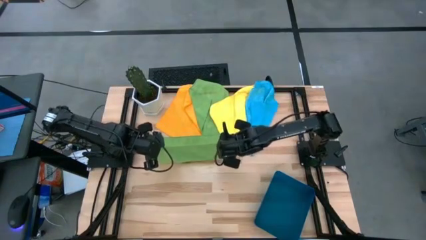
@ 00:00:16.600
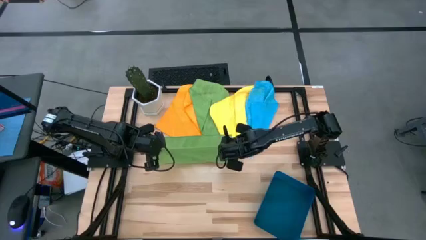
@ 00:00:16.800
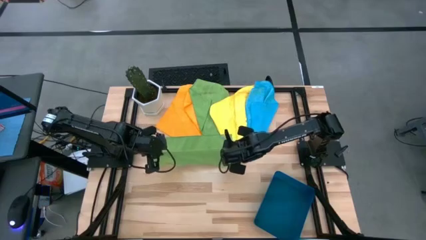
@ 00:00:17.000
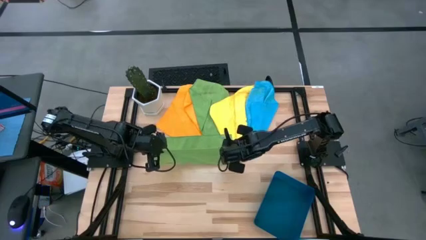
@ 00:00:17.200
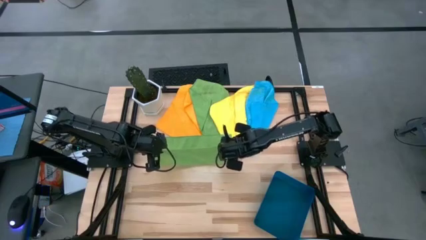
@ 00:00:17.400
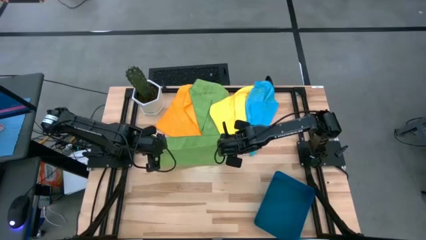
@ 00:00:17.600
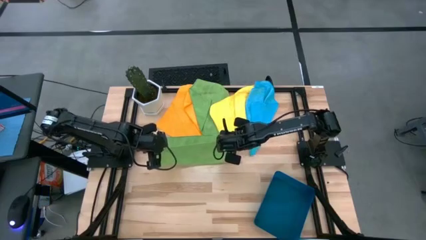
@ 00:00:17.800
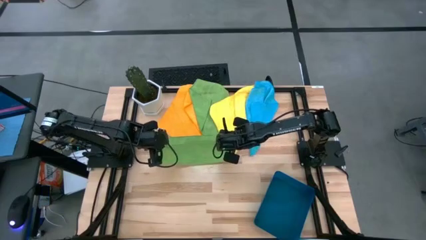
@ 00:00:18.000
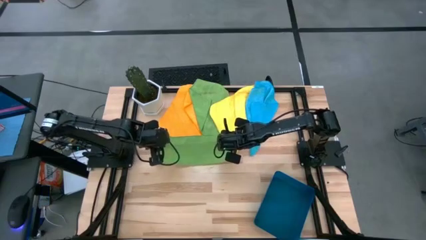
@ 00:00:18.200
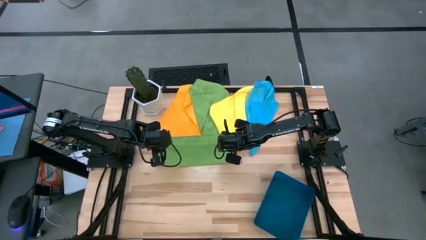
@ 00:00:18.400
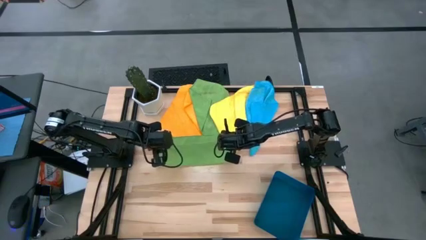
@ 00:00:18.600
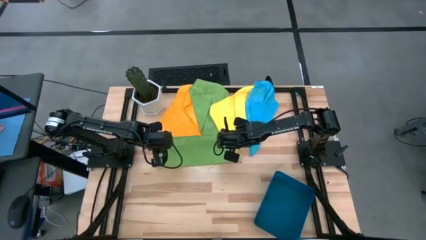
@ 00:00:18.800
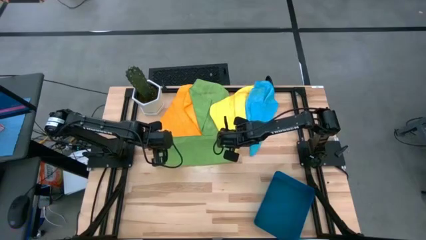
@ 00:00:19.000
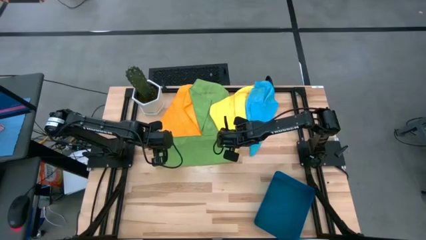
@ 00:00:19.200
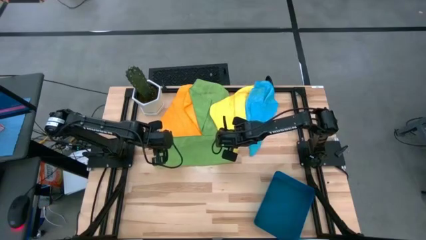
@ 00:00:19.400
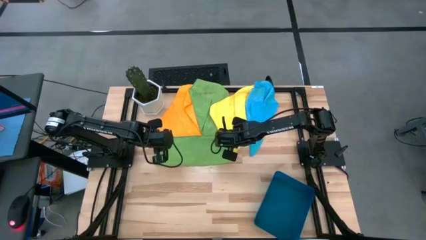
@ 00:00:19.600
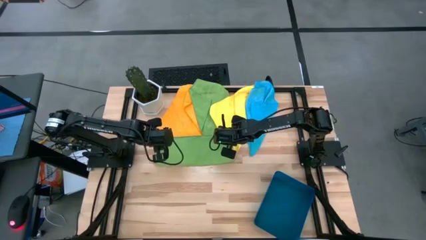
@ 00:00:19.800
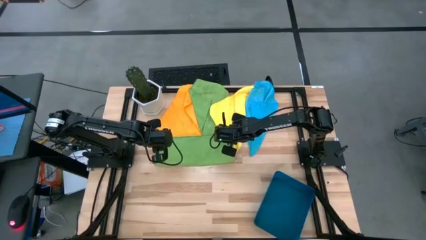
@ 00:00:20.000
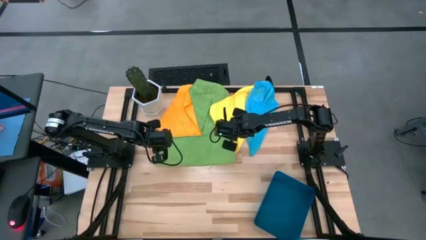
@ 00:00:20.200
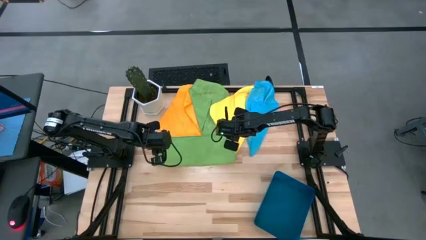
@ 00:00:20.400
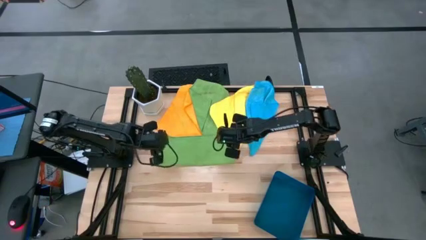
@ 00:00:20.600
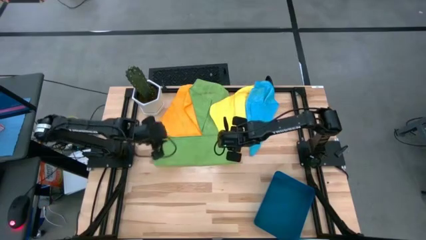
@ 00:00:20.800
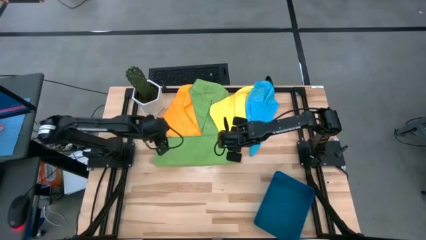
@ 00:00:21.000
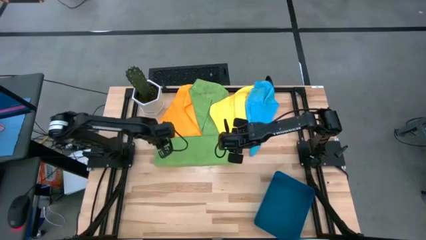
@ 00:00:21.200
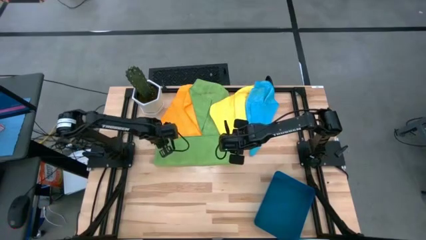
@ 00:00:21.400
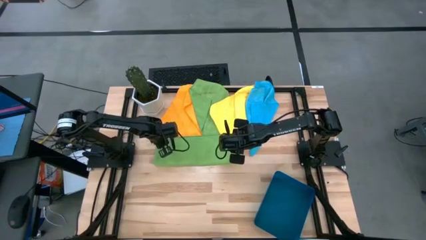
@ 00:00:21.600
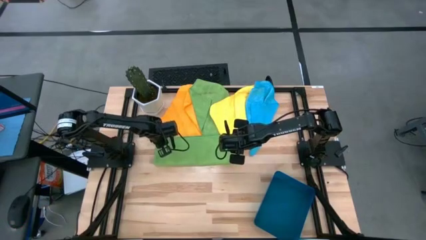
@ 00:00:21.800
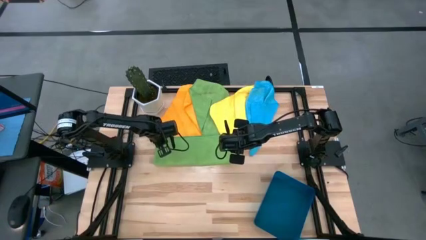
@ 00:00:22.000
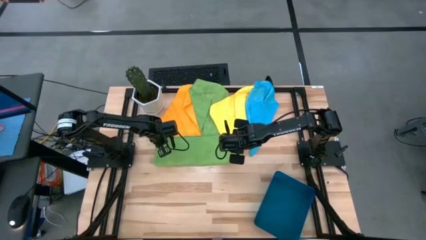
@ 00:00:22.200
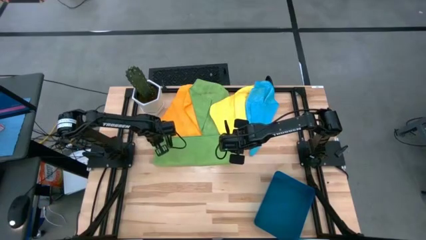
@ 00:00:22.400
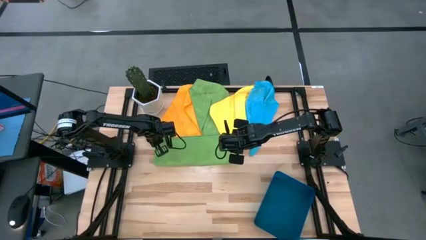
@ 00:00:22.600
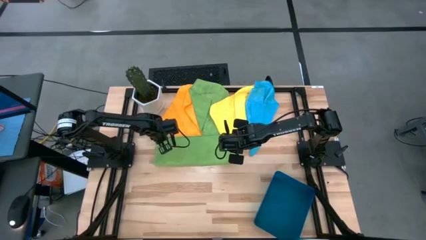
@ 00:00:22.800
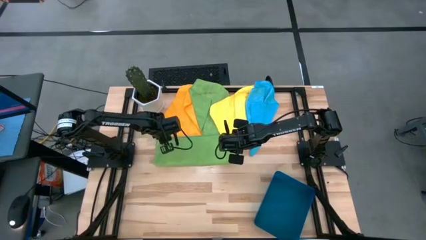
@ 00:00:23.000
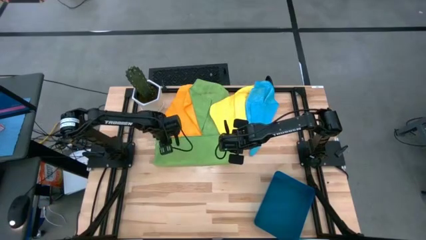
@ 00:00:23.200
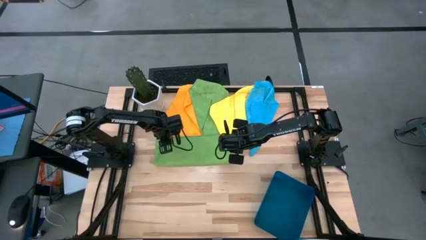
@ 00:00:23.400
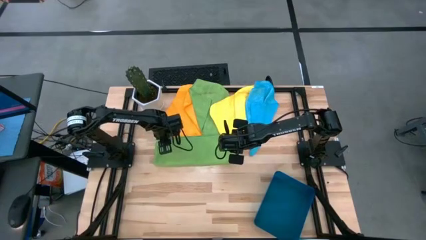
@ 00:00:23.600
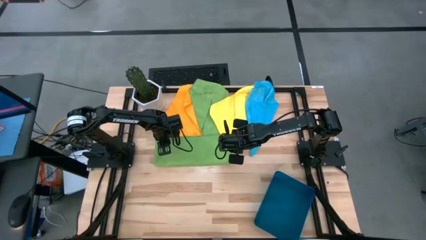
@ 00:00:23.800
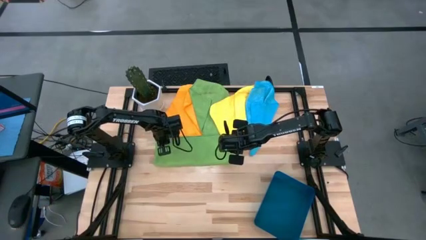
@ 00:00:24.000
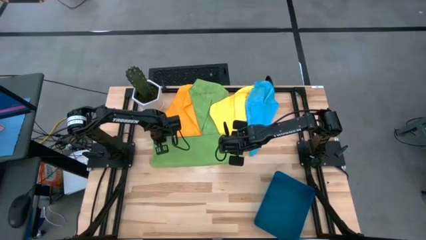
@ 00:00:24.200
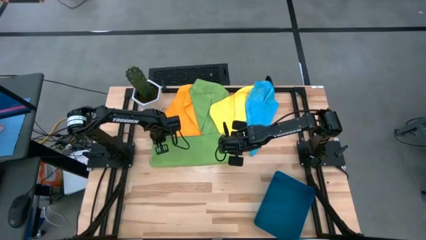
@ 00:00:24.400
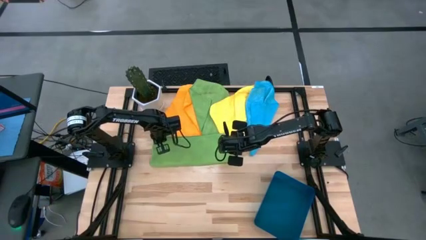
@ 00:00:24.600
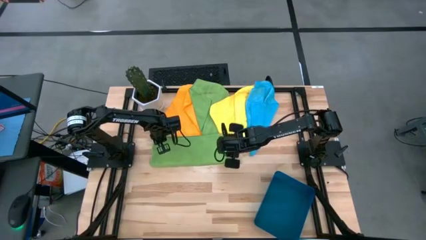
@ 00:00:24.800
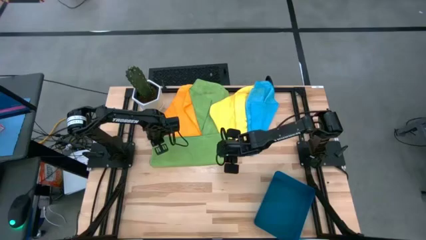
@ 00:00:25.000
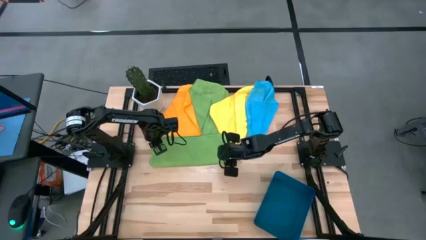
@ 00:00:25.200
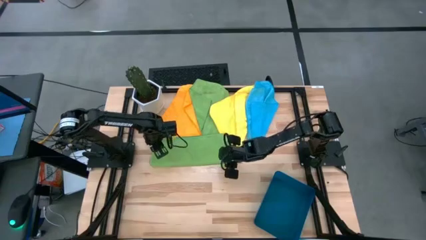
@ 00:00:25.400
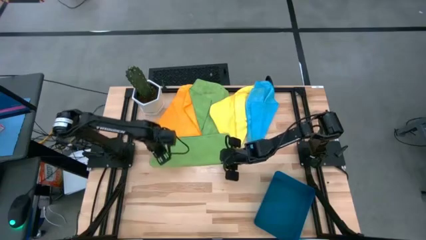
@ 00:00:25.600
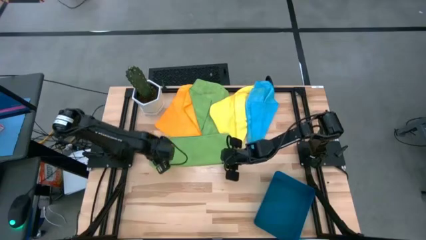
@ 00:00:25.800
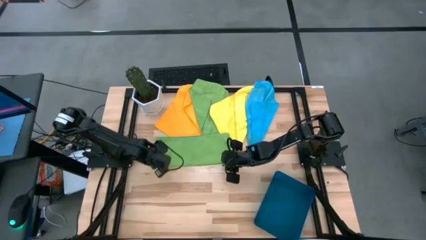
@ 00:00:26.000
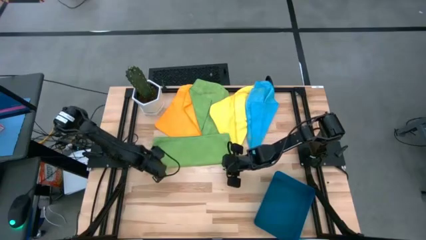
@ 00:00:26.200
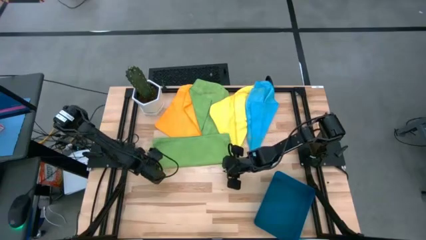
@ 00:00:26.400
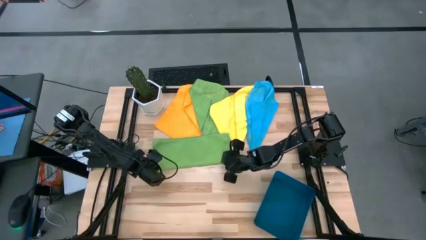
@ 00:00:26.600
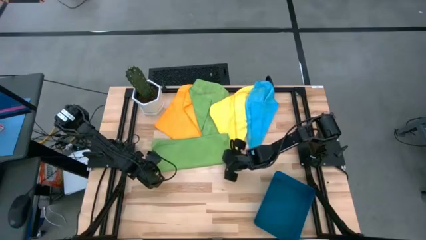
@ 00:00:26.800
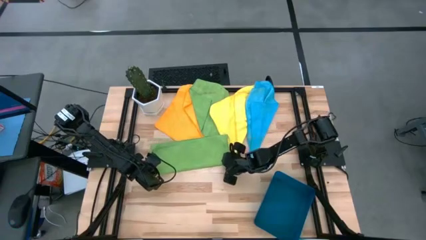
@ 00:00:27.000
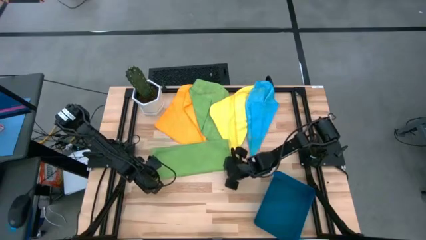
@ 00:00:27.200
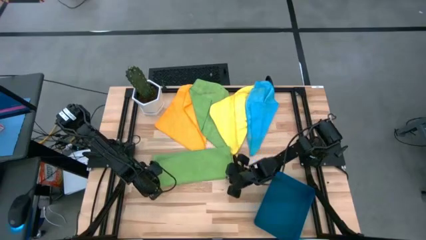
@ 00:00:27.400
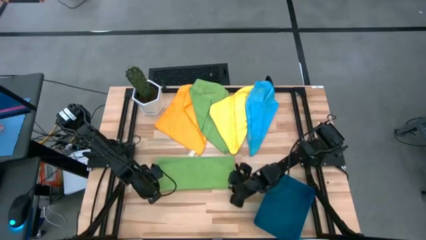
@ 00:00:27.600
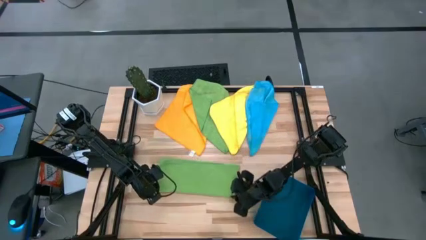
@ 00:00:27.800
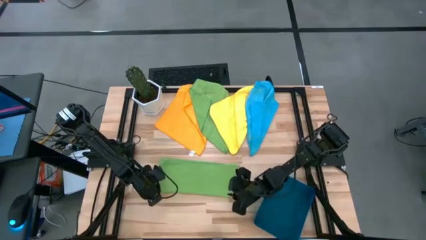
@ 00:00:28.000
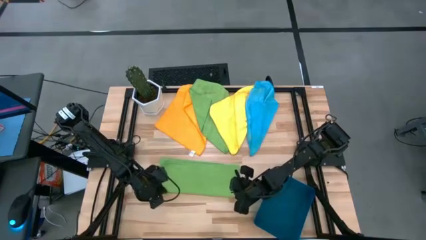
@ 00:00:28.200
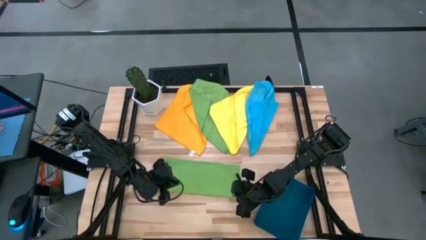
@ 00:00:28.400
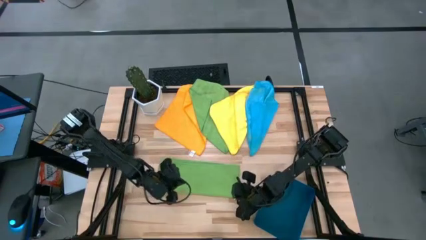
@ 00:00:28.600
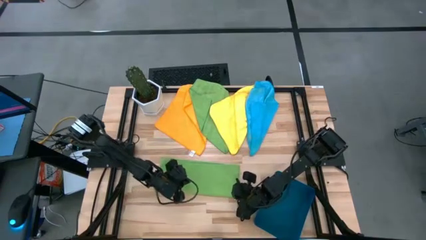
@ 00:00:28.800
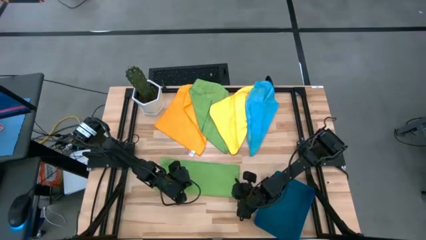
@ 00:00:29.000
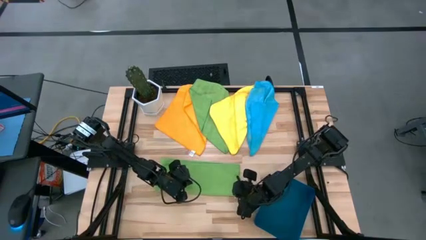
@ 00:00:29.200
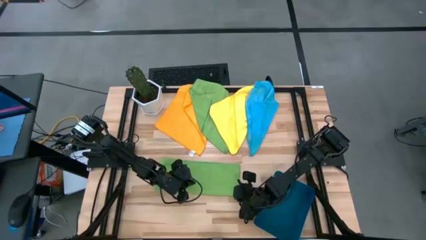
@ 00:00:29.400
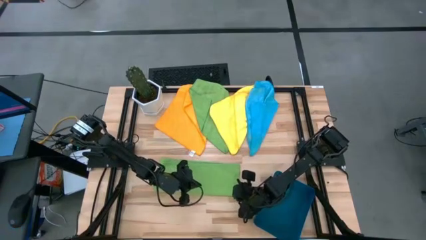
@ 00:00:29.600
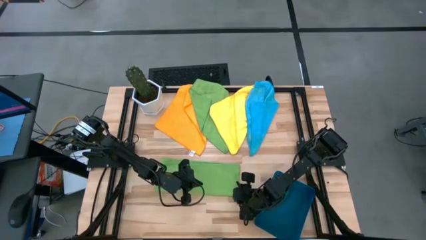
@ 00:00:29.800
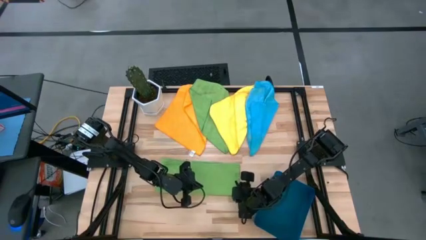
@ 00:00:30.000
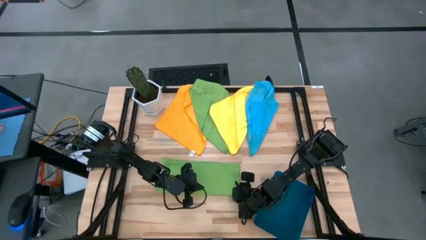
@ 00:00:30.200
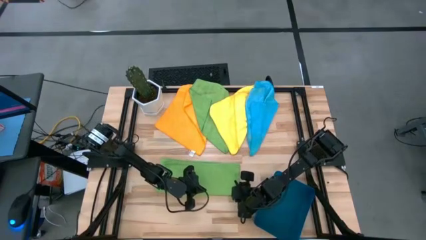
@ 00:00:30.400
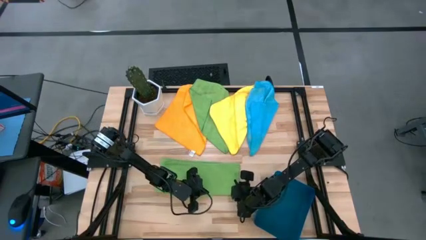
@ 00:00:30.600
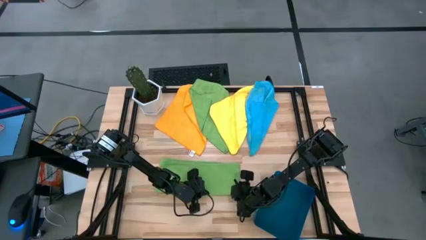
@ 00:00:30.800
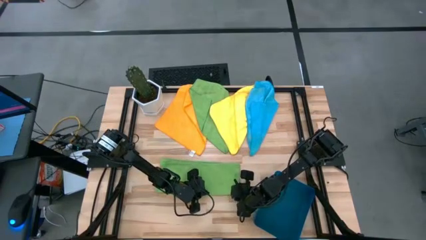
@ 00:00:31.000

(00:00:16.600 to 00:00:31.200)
Task: Fold microfiber towels
Fold the right green microfiber towel
